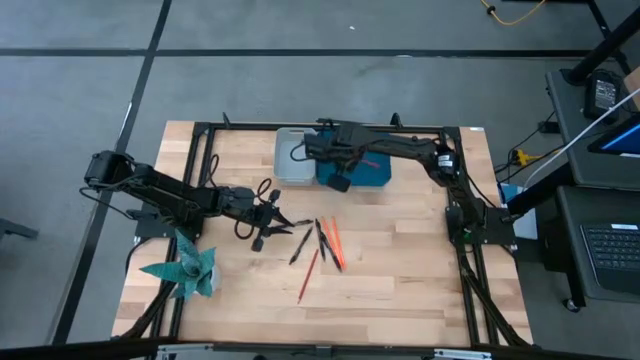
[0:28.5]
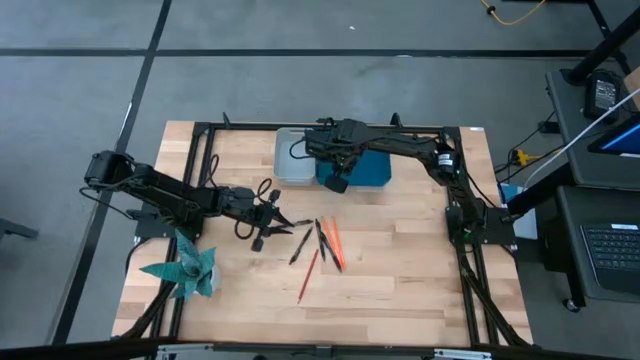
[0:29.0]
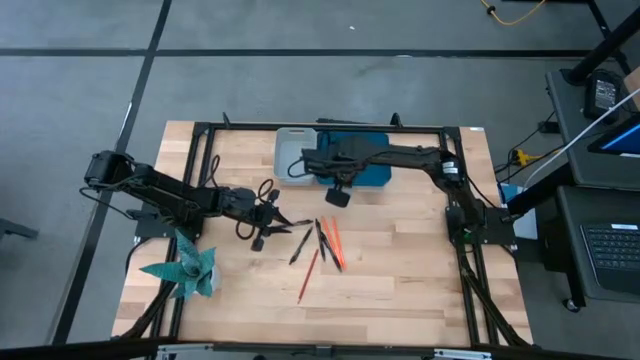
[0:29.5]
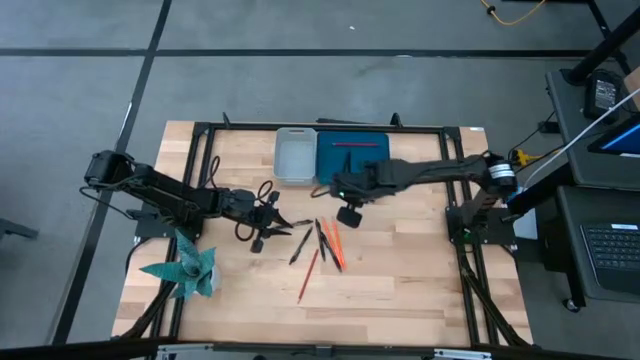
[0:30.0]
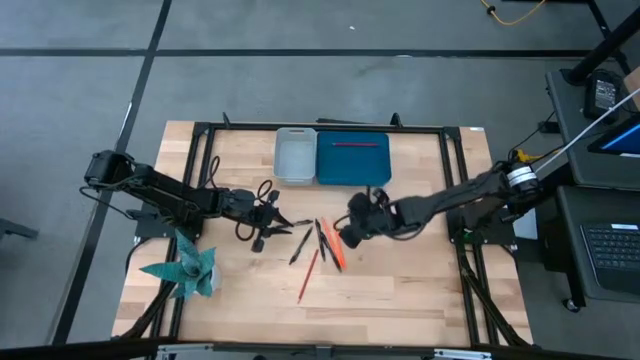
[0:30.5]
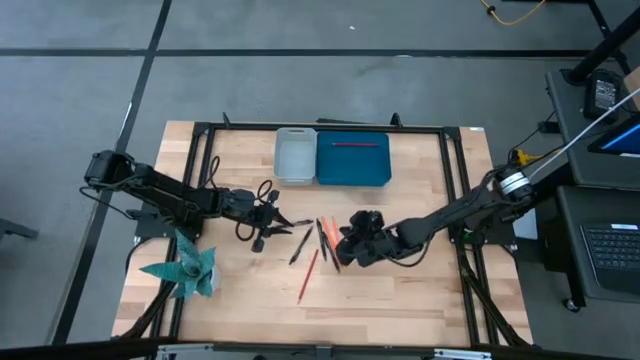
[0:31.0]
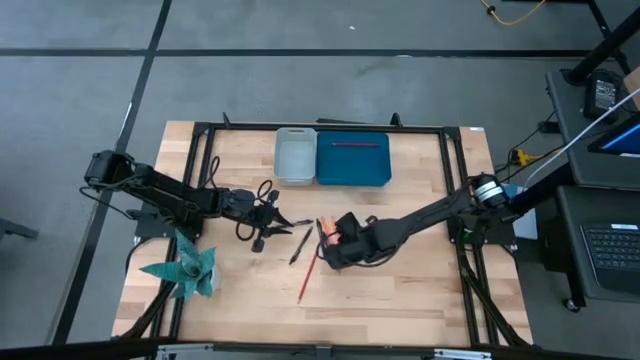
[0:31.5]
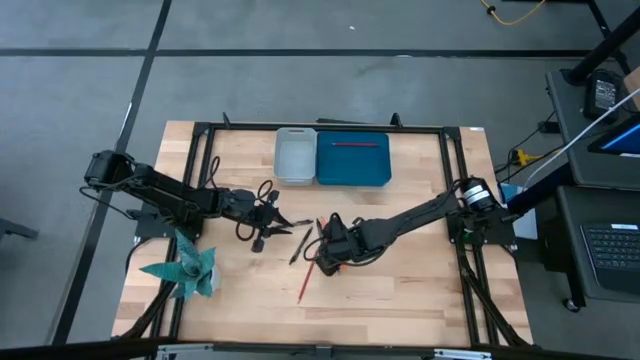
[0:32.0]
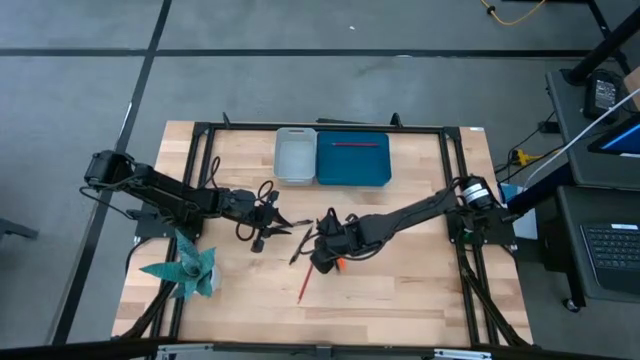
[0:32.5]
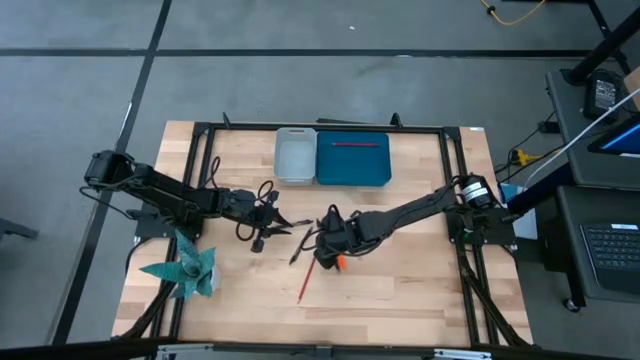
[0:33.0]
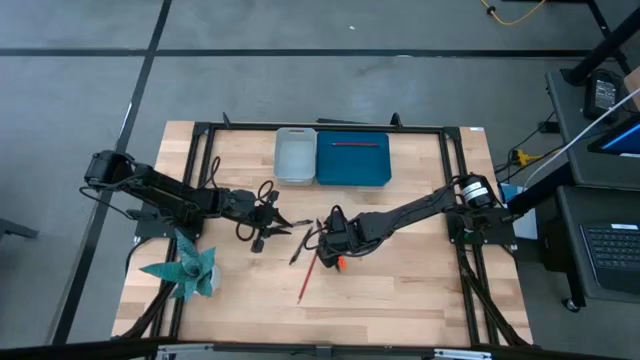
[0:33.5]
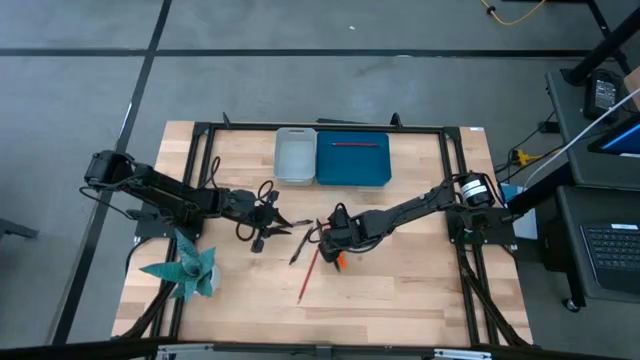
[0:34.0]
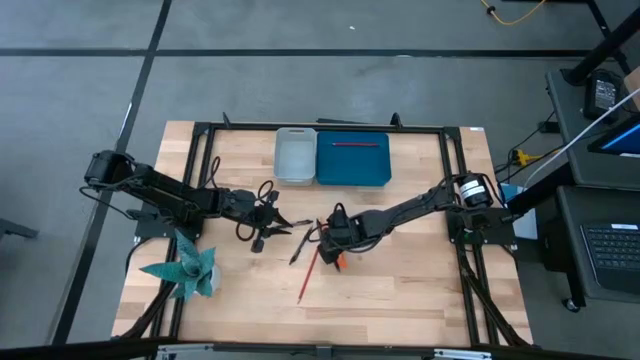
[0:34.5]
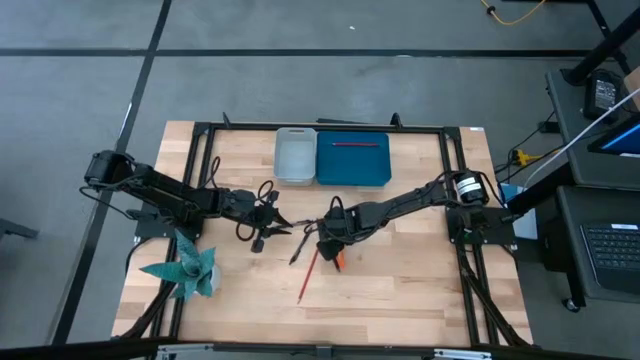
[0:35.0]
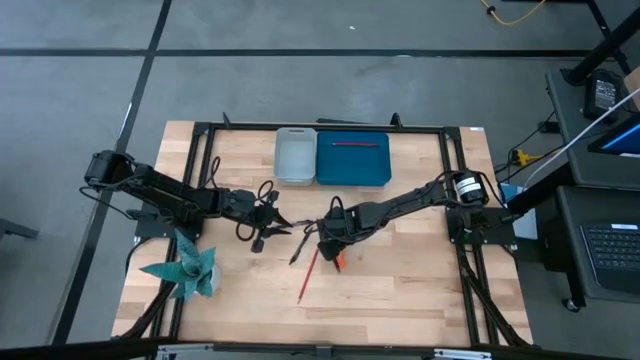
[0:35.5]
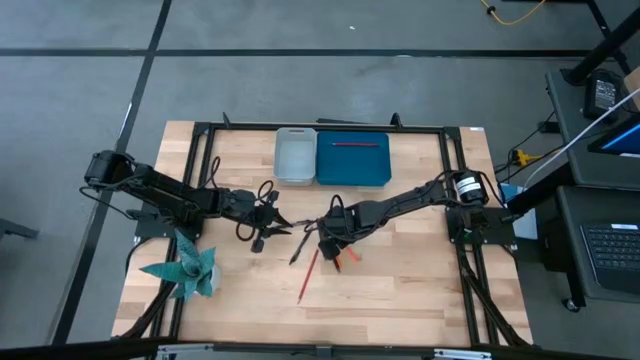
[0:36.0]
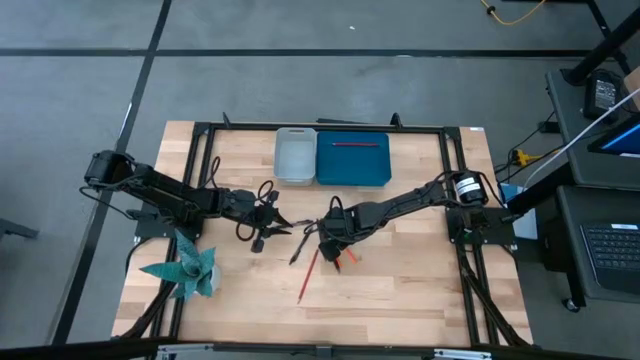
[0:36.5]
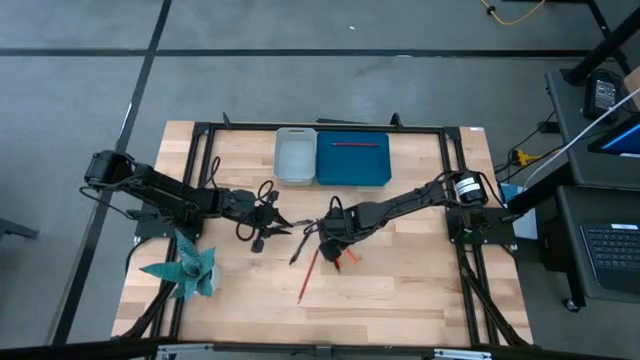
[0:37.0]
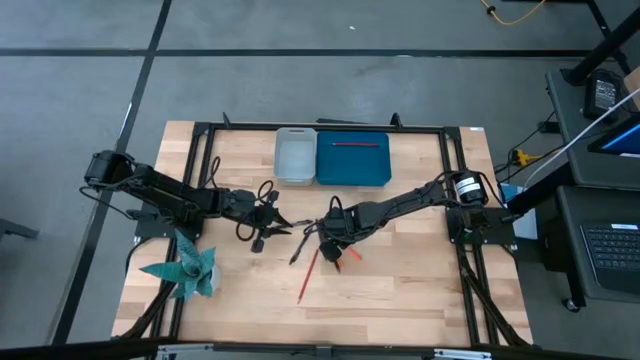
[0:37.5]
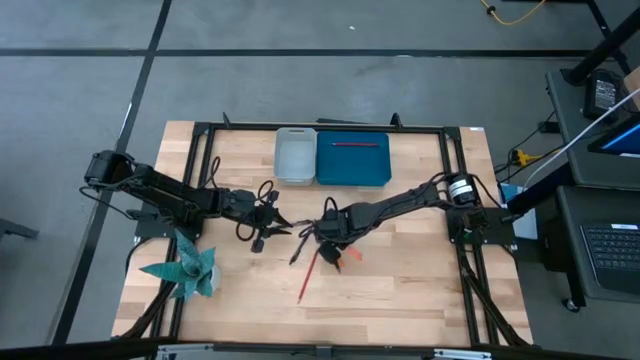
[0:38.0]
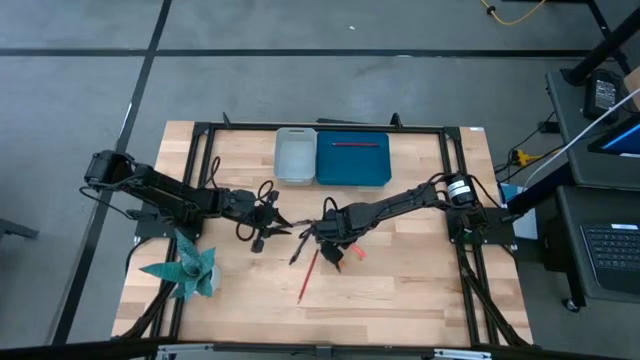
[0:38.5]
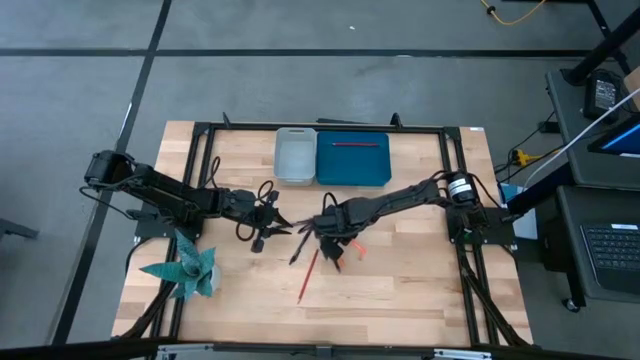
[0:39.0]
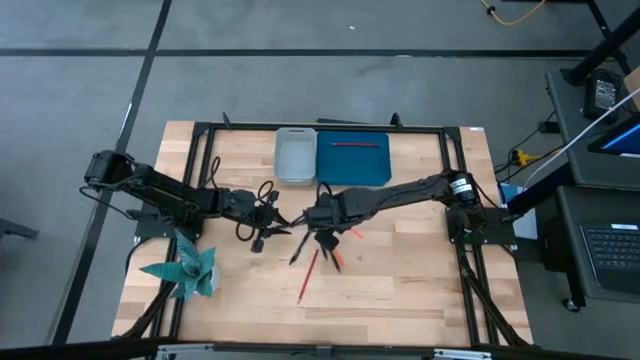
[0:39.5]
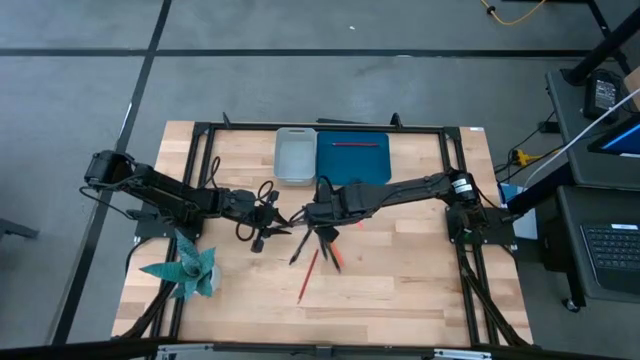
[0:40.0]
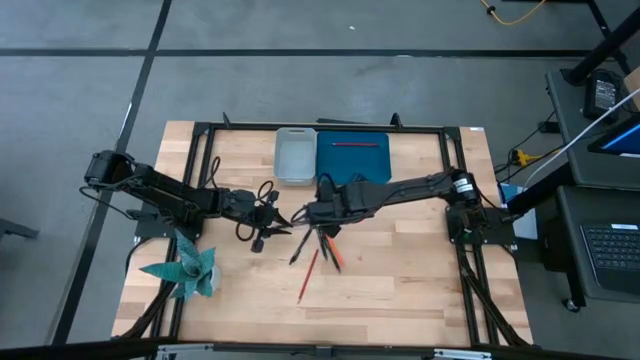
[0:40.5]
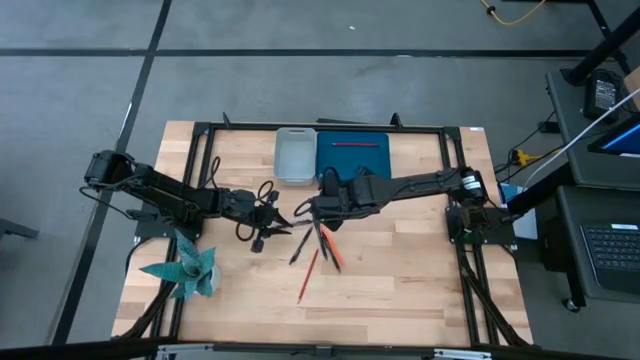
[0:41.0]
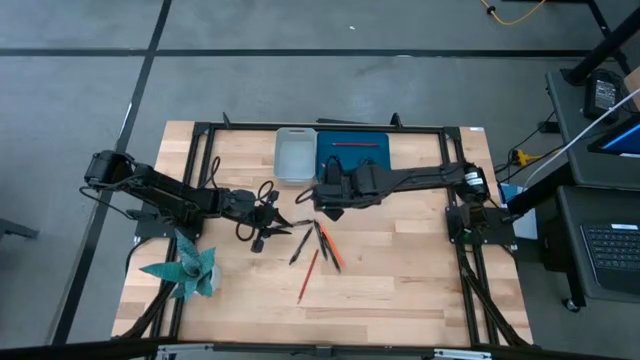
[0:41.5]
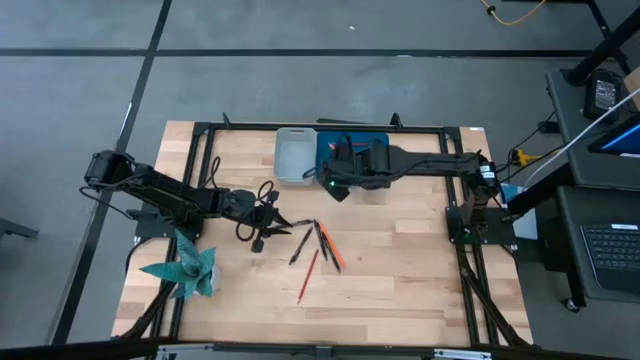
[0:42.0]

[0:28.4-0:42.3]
Task: Sort pens & pencils
Put the right orange pencil into the blue bin

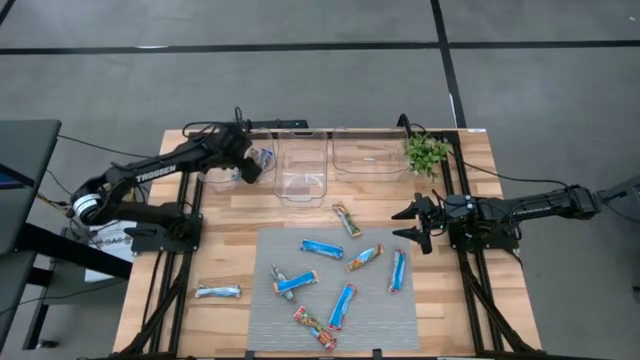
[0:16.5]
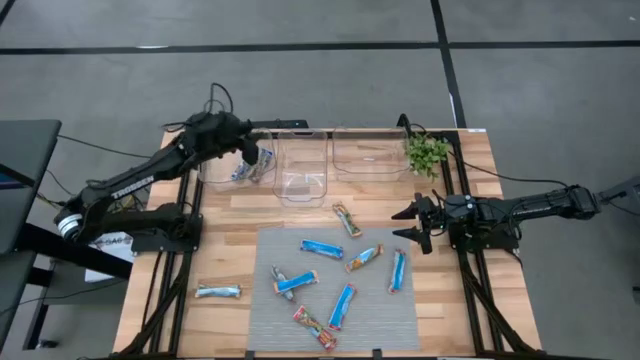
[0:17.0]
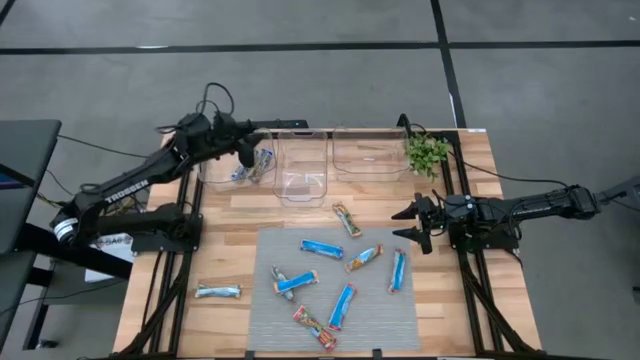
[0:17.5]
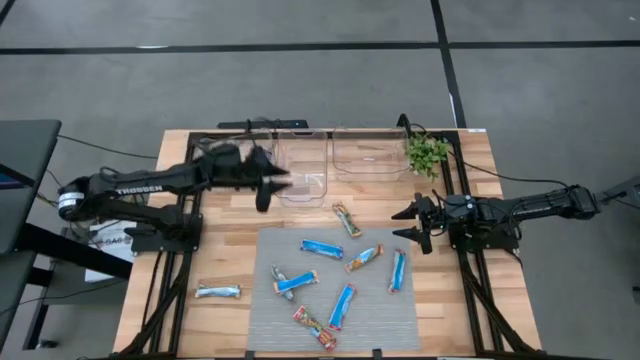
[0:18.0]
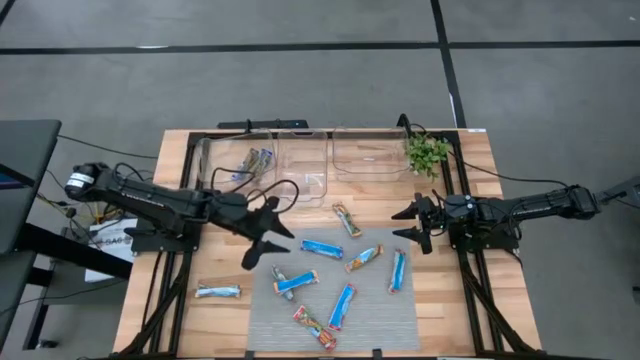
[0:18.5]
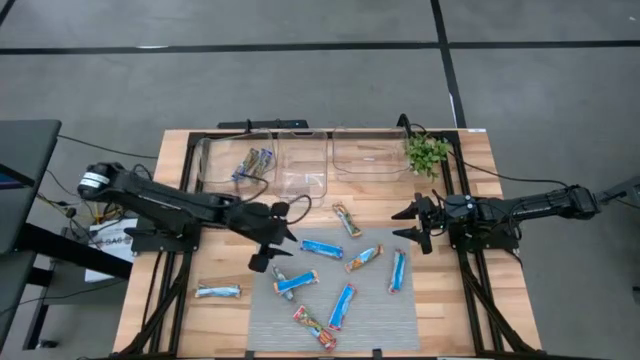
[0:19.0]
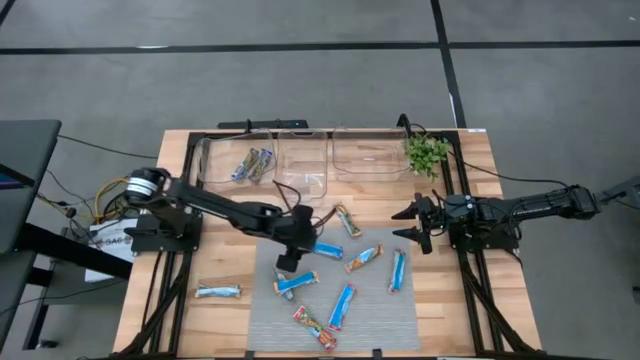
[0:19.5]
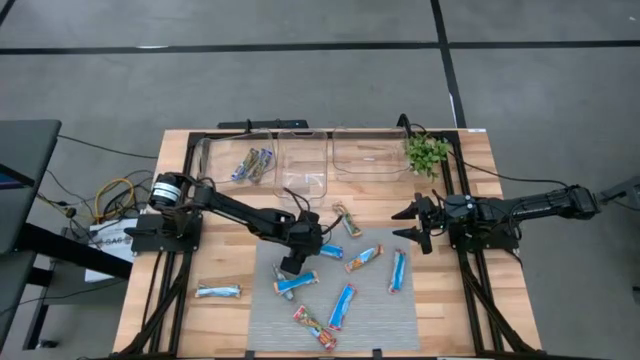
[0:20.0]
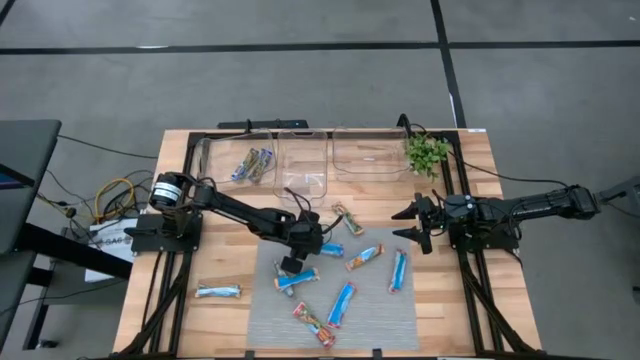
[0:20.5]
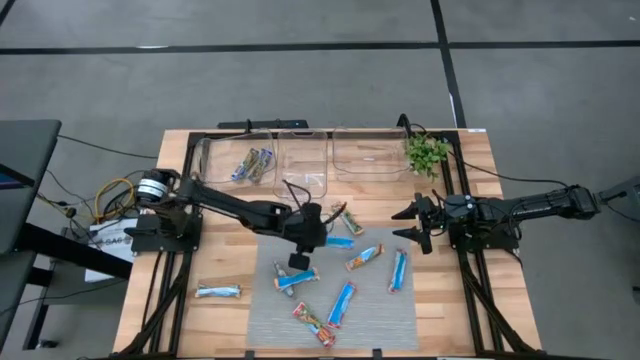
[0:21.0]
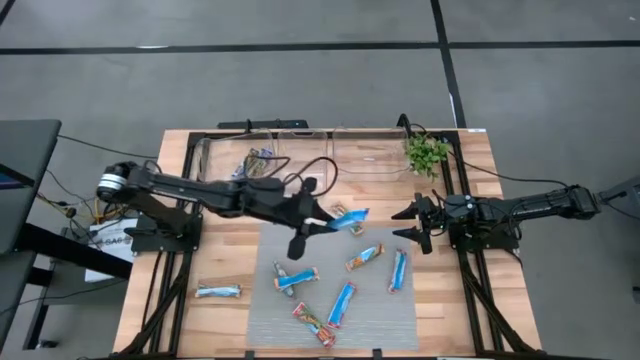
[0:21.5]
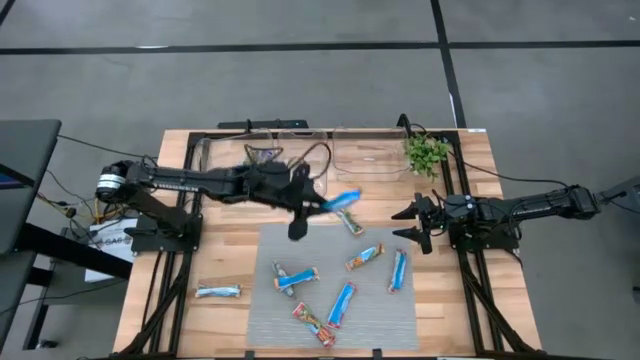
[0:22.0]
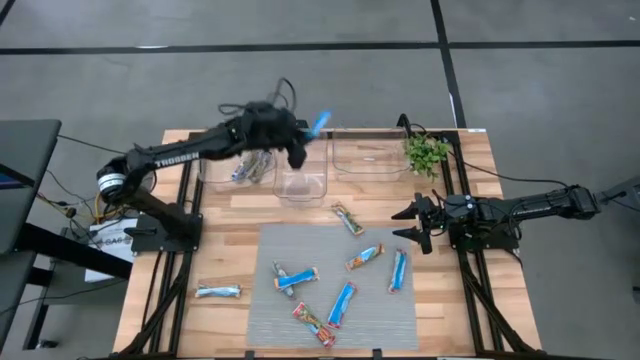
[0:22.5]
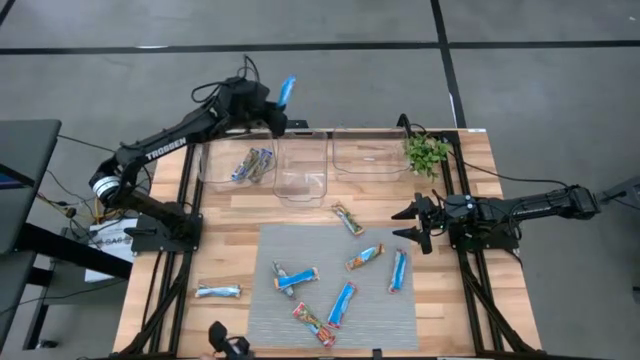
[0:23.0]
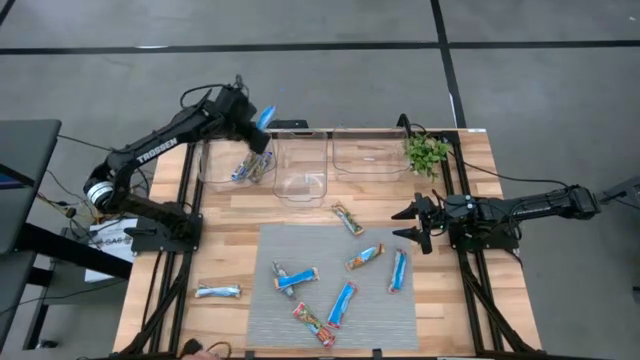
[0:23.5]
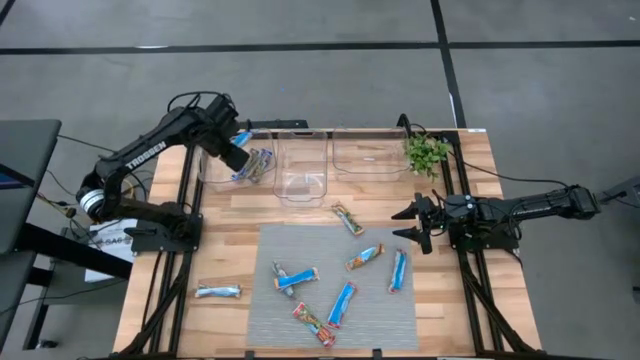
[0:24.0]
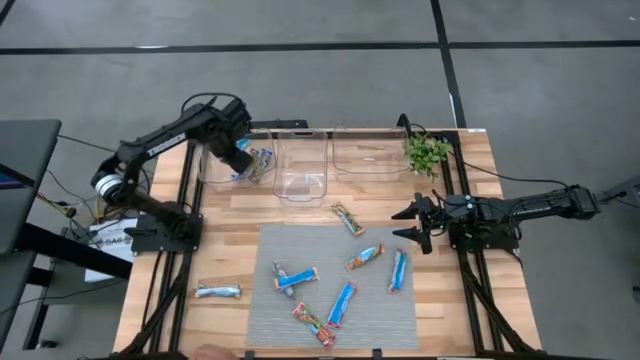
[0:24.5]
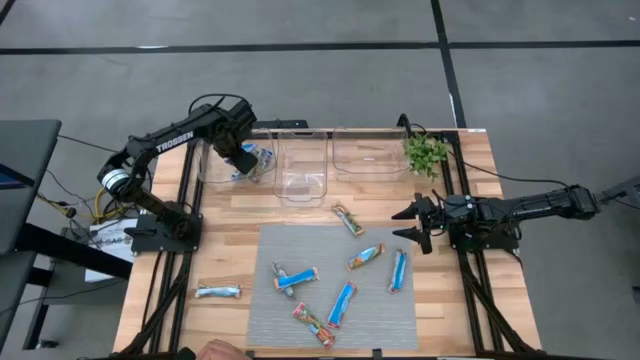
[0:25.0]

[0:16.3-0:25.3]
Task: Pick and place Granola Bars by type
Put the blue granola bar into the left transparent bin
